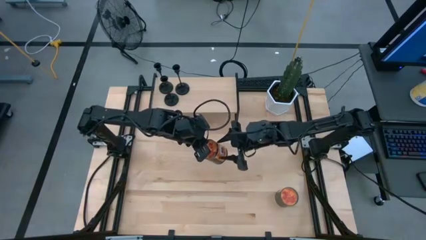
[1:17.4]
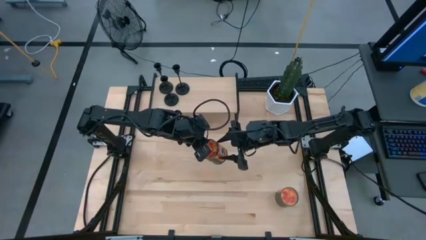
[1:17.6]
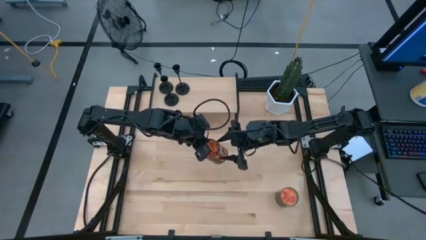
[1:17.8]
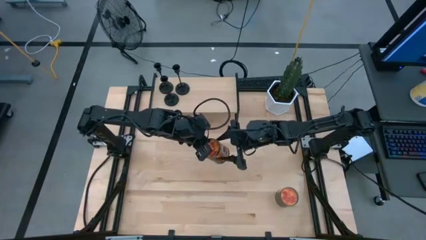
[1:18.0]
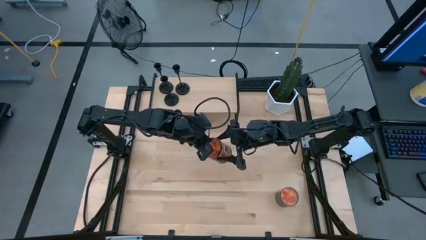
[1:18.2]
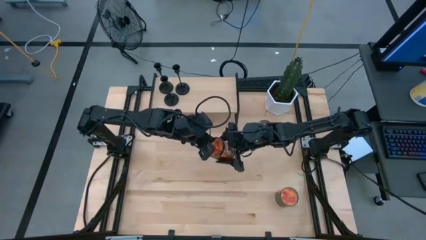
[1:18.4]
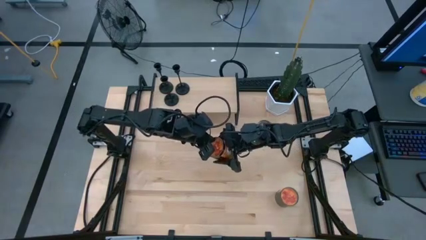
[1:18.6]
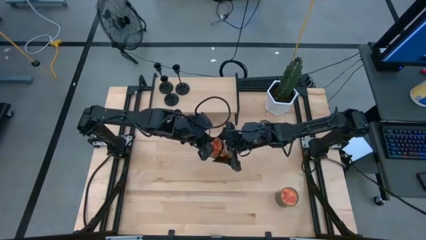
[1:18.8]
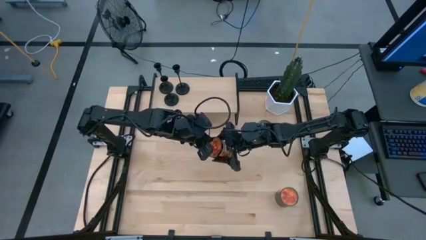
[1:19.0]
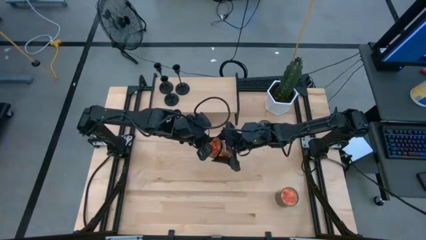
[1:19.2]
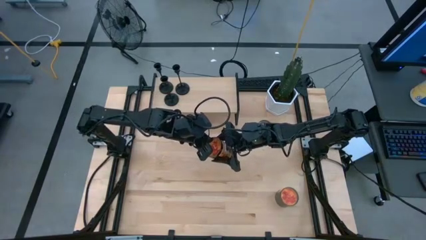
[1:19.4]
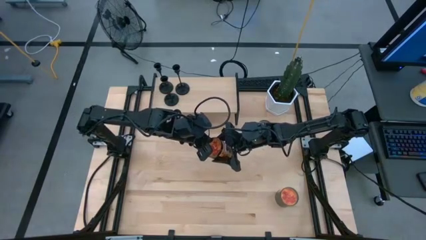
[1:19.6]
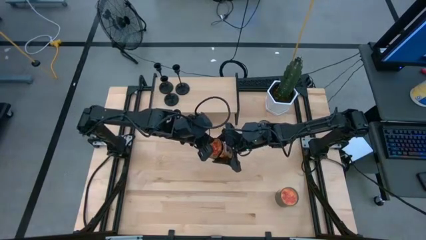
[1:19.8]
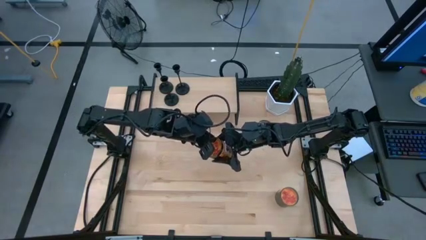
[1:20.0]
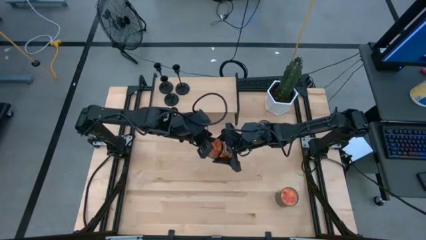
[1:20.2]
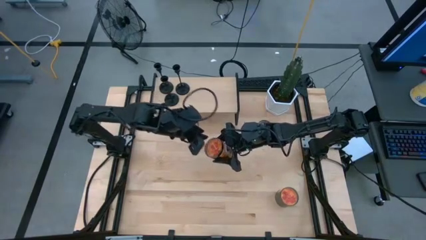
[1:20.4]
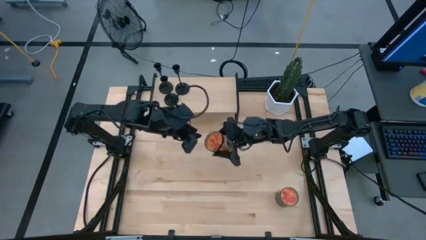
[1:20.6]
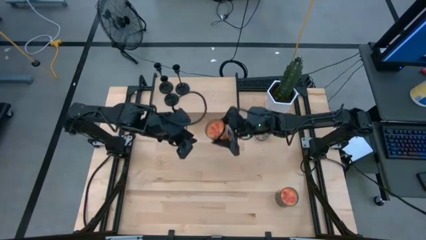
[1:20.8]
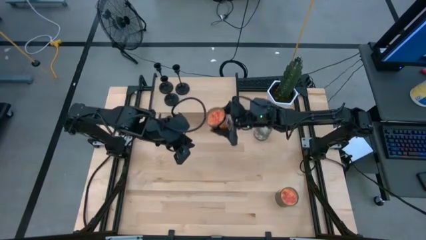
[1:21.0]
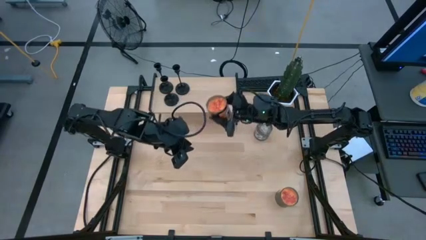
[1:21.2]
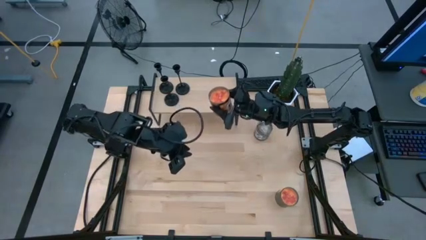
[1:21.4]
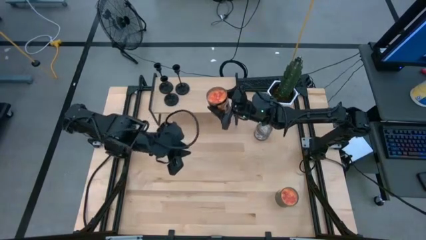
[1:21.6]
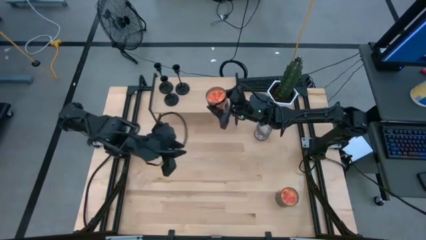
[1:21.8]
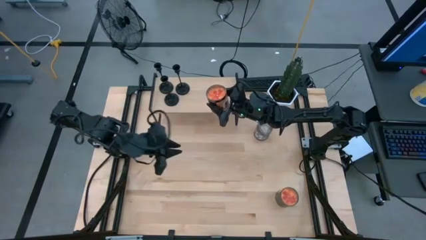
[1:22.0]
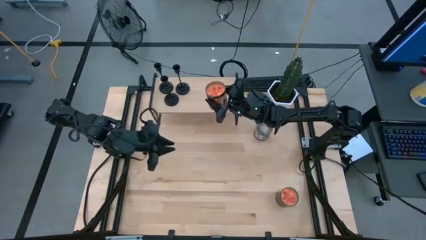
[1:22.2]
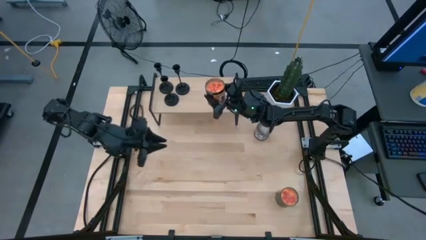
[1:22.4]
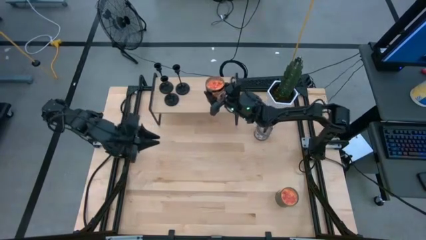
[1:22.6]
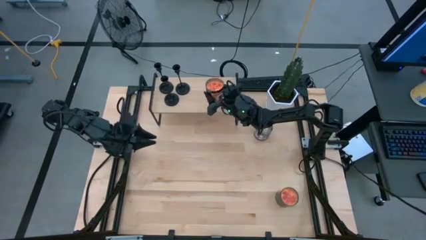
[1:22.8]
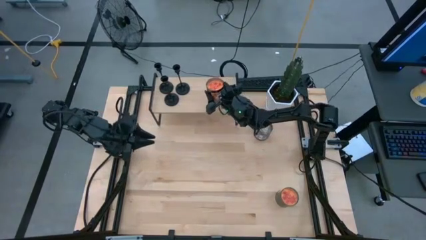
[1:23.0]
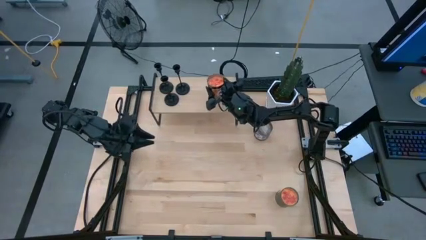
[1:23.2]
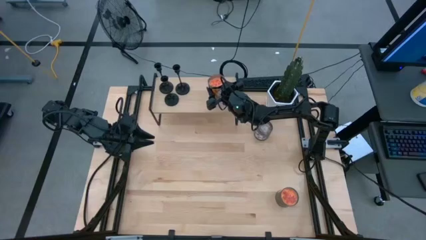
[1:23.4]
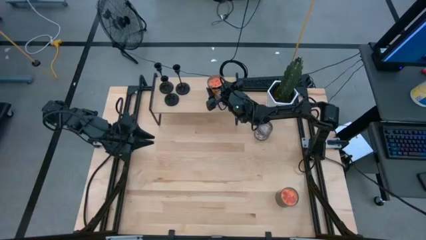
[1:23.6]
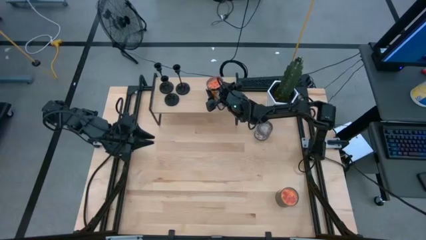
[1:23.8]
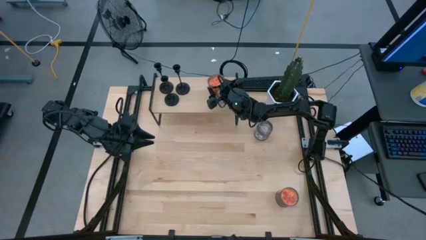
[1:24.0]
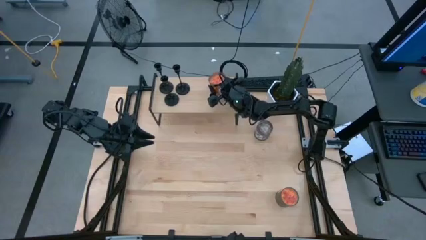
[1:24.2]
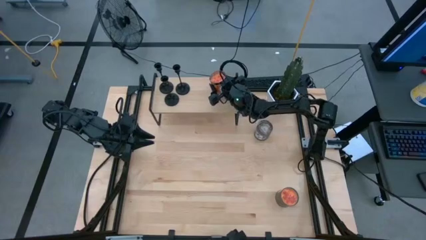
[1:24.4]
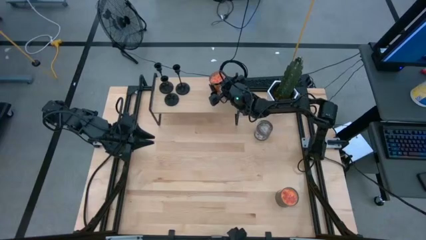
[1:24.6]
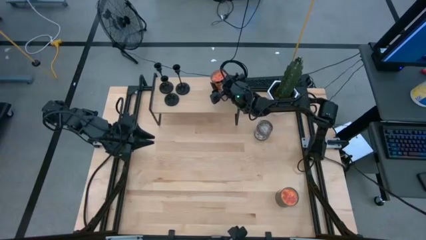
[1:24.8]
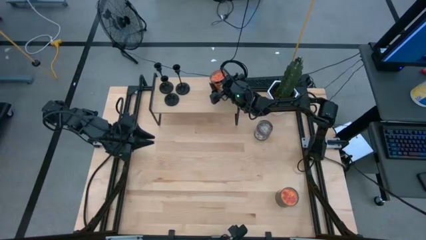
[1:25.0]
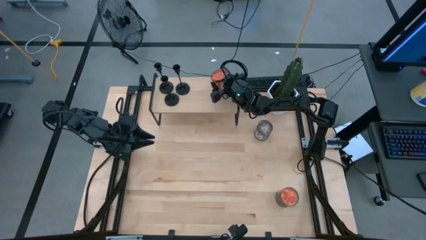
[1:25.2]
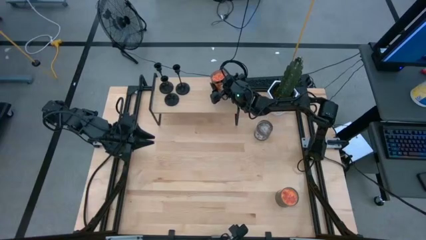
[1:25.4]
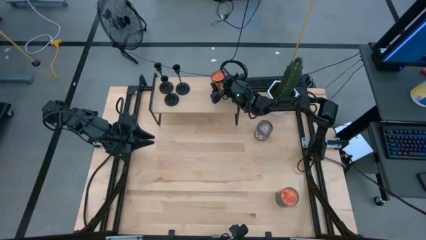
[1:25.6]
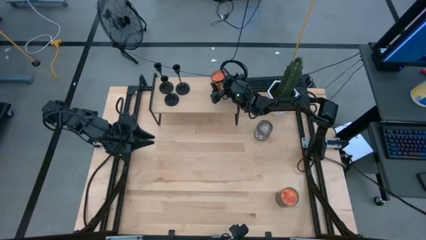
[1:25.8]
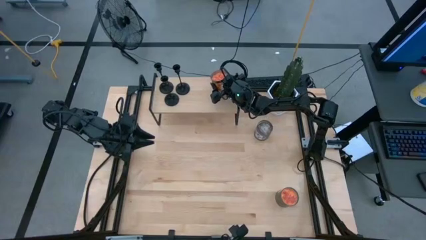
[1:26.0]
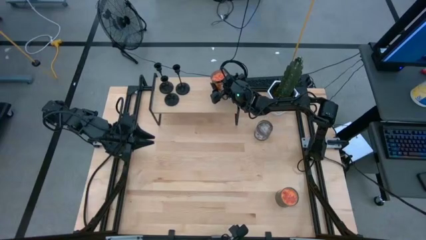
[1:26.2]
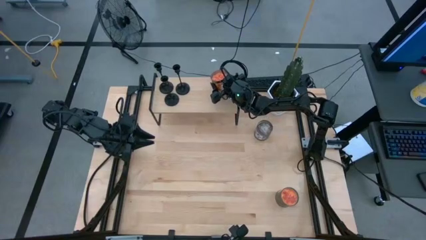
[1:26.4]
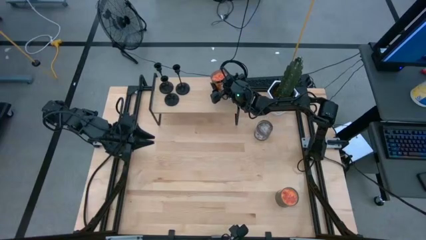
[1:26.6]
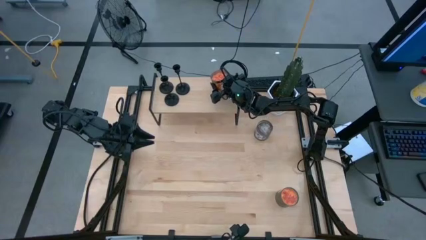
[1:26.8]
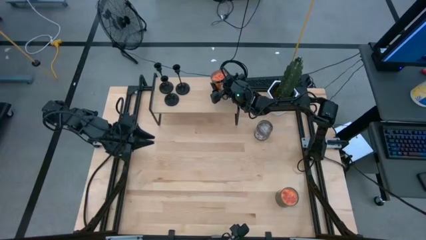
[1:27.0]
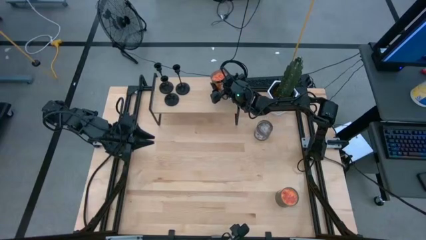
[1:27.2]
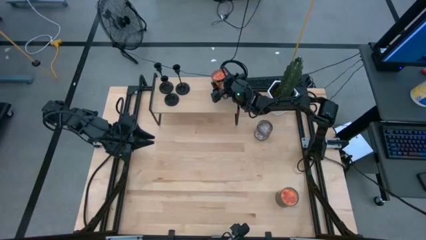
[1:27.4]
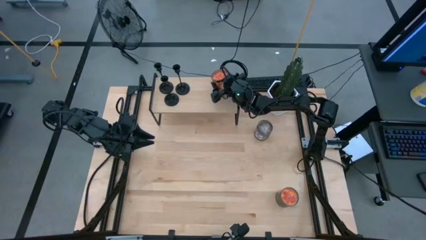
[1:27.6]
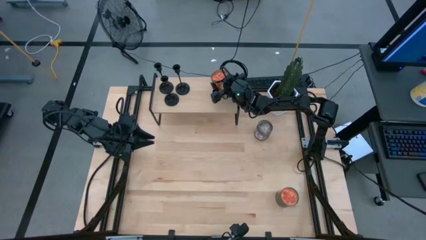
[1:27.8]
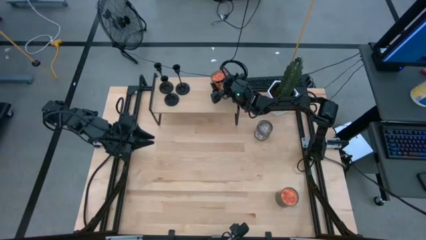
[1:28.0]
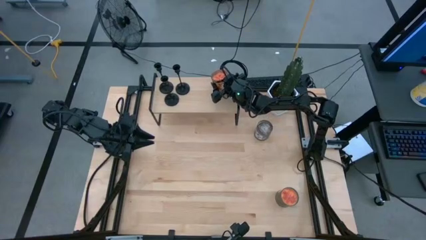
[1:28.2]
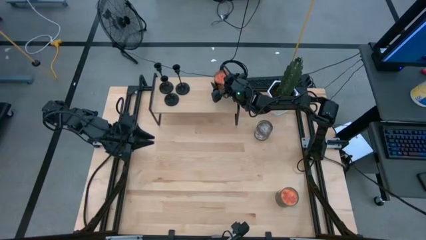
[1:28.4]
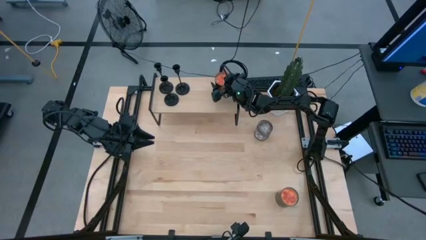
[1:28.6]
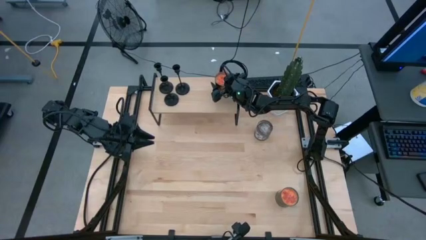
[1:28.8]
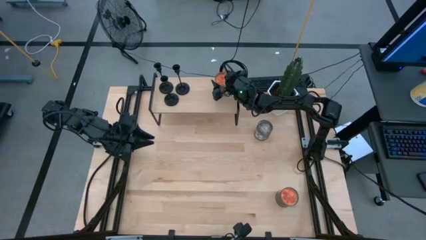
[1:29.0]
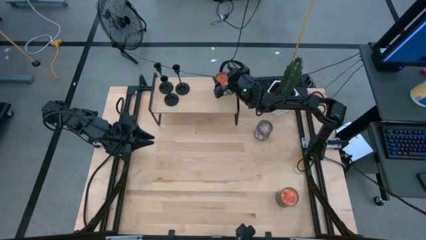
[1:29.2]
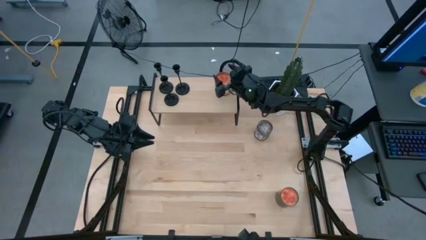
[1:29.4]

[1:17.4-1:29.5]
Task: Pick & Place candle stick holders
Put the left orange scented candle on the shelf

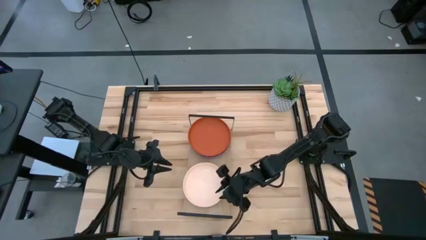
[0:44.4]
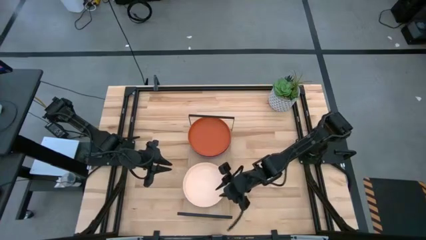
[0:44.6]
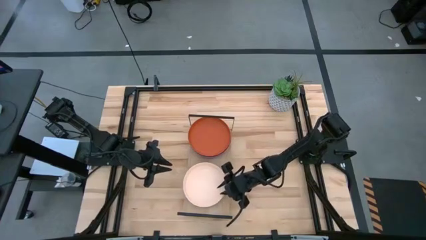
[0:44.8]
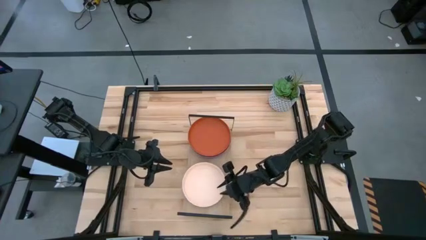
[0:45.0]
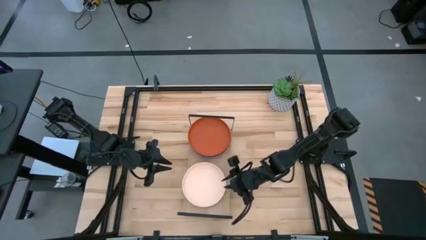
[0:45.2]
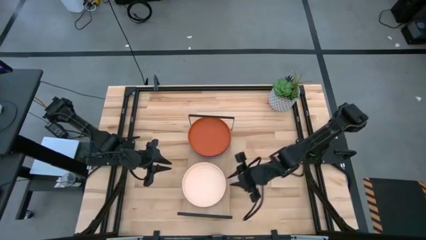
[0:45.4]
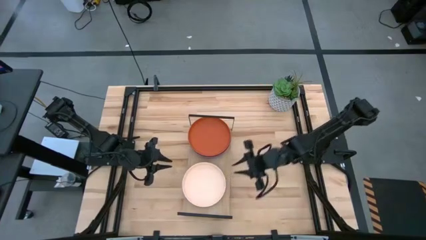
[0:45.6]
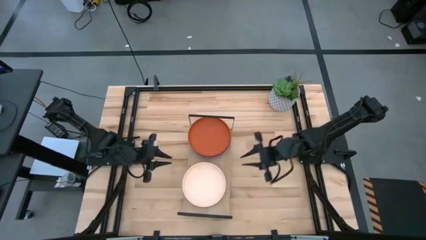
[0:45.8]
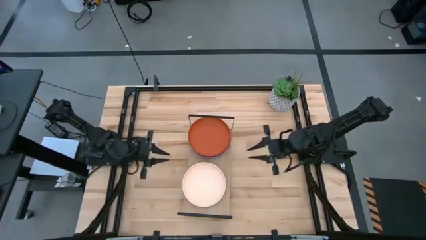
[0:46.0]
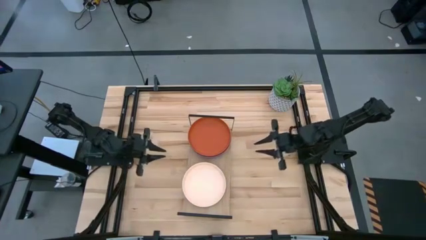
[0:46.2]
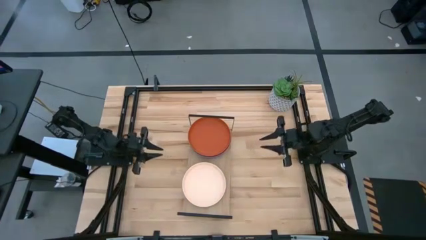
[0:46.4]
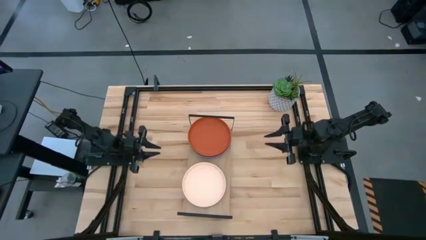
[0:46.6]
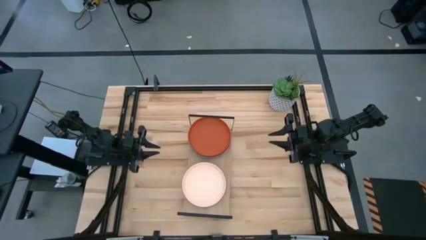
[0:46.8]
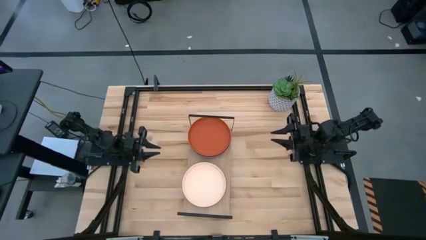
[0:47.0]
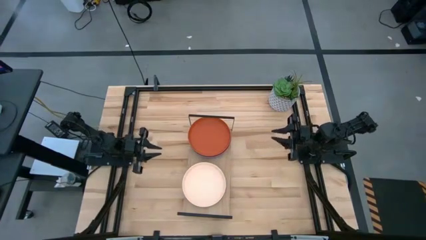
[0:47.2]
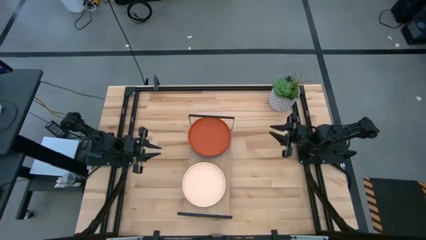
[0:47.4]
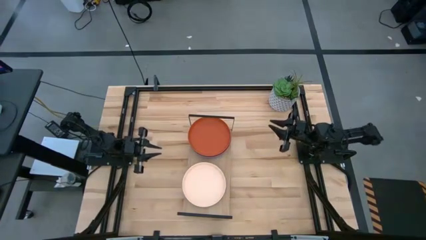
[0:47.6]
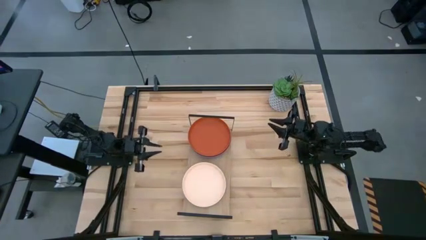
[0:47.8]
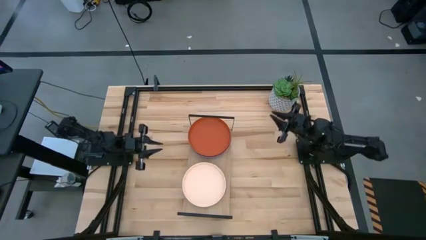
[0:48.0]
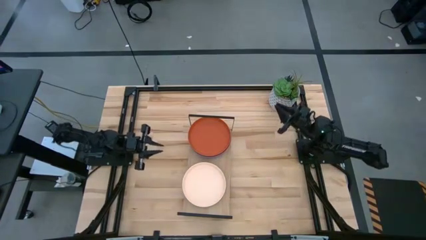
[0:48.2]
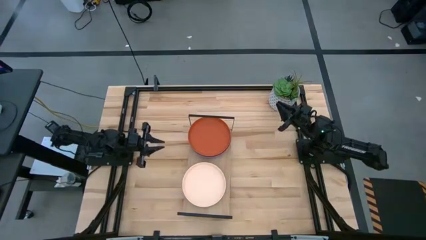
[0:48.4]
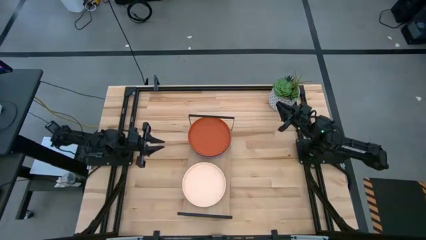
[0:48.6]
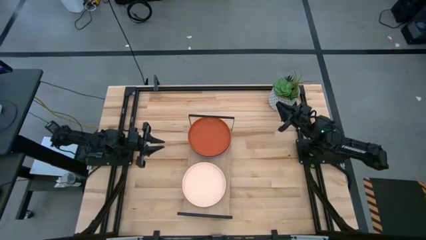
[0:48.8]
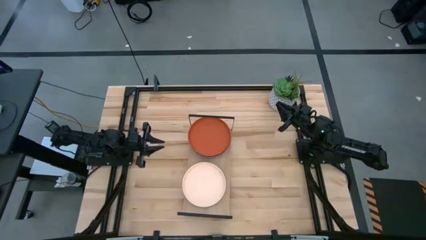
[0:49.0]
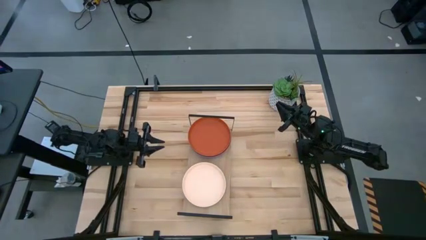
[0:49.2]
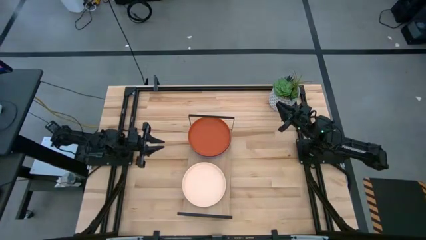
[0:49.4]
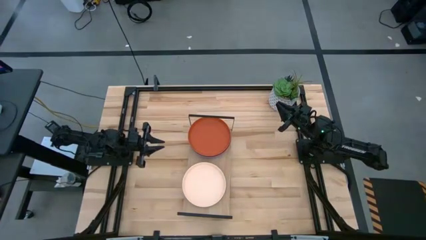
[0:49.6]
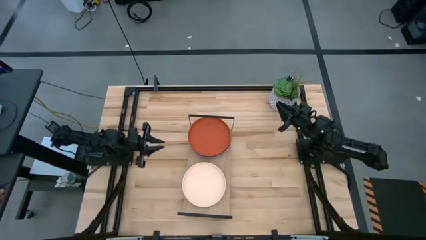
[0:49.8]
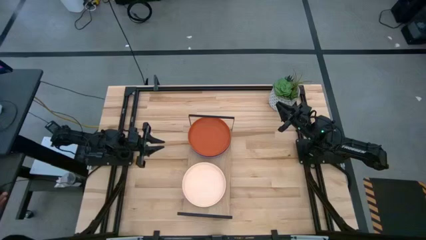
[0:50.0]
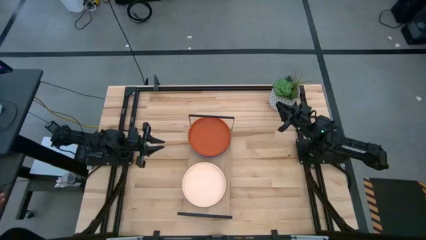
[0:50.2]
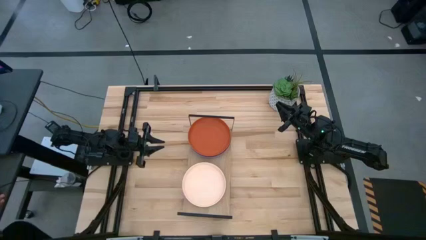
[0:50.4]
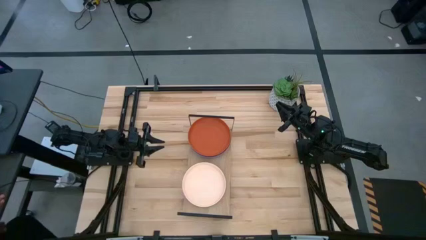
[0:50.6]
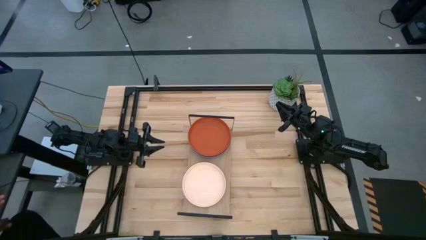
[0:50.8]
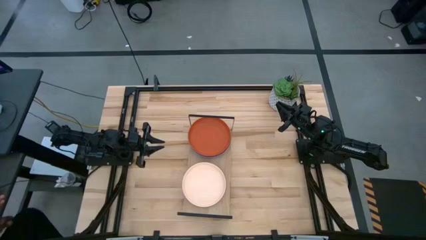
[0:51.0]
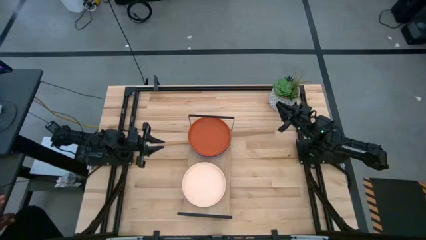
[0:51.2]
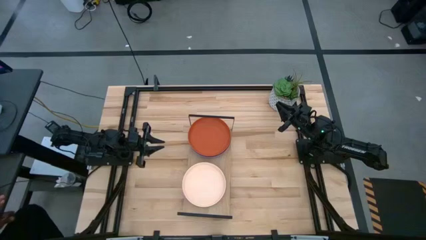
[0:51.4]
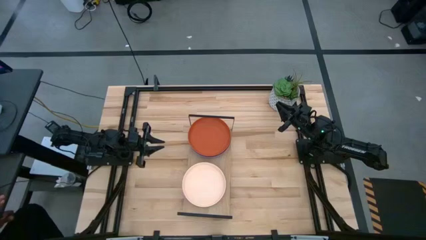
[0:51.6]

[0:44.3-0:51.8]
Task: Place and stack plates onto a shelf
Return to Home Position
